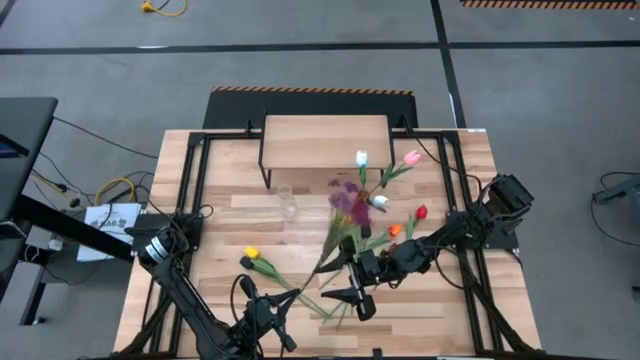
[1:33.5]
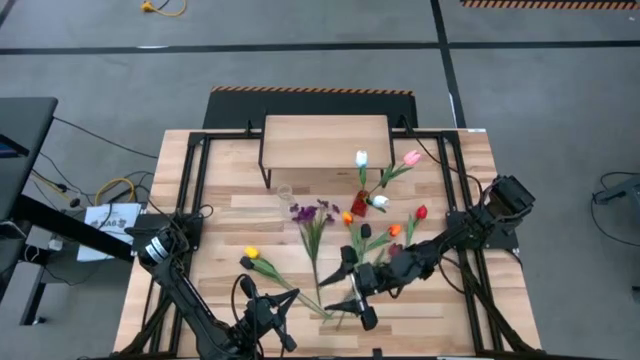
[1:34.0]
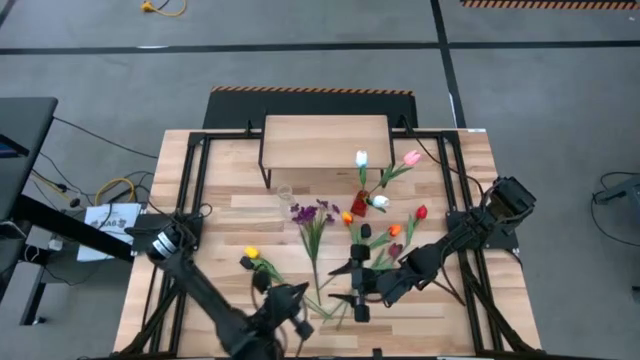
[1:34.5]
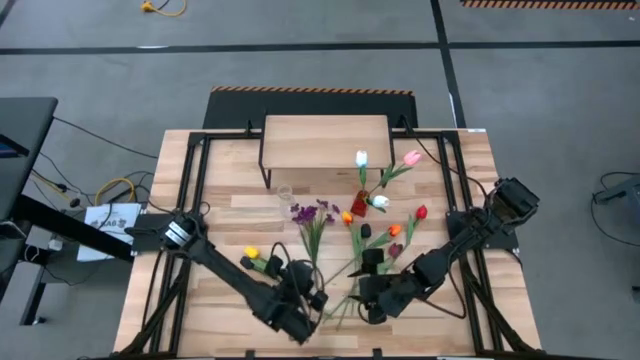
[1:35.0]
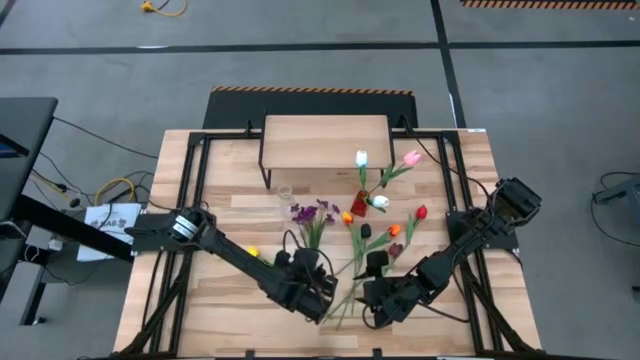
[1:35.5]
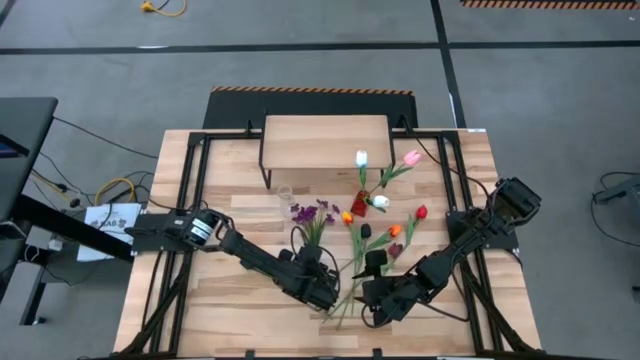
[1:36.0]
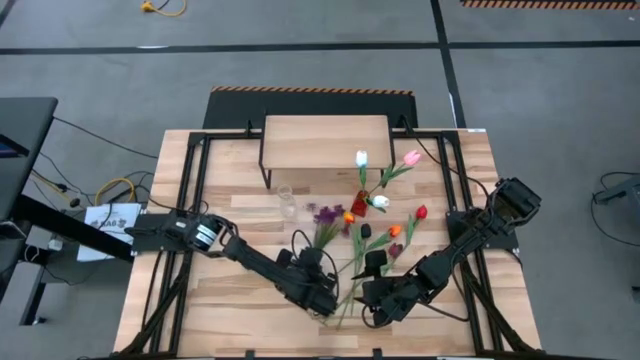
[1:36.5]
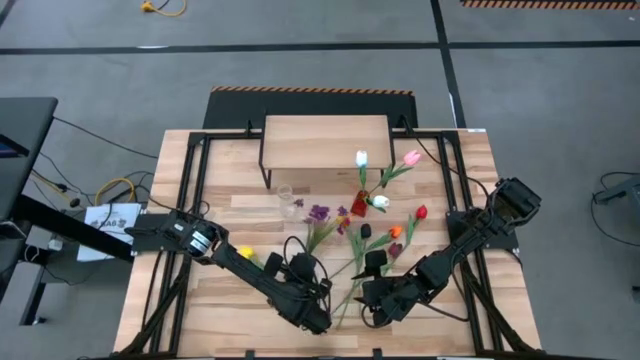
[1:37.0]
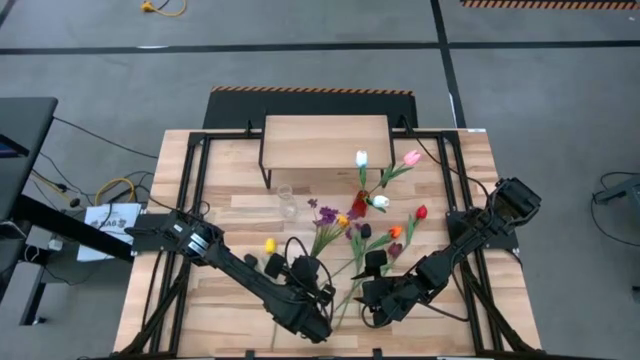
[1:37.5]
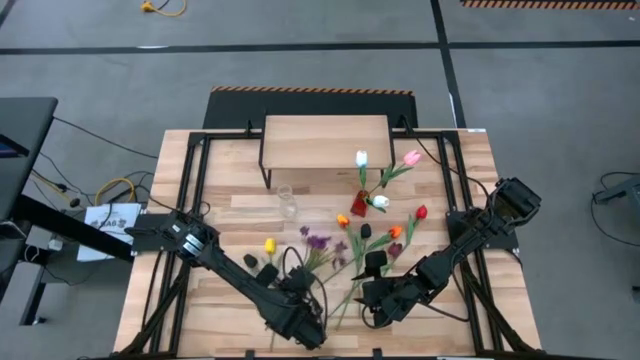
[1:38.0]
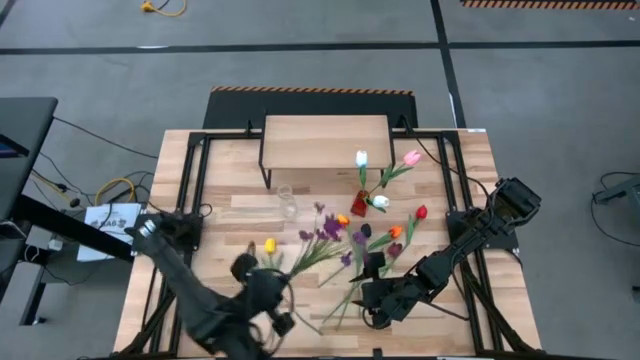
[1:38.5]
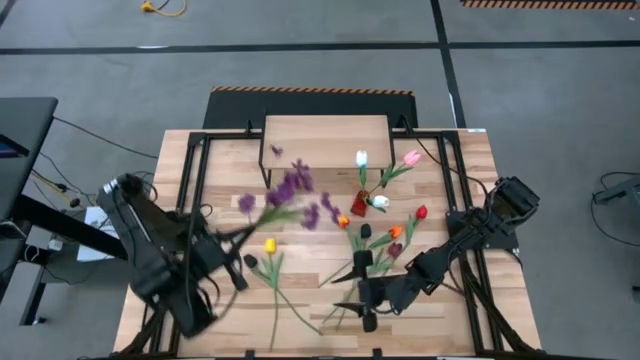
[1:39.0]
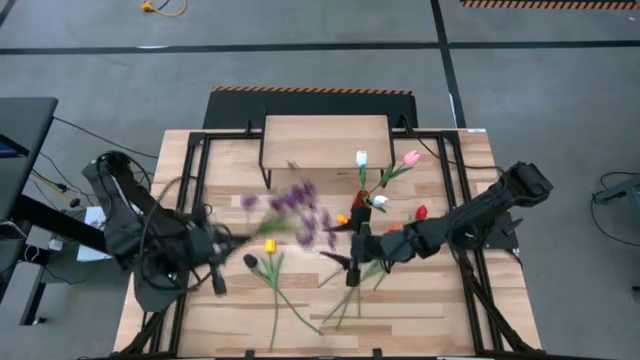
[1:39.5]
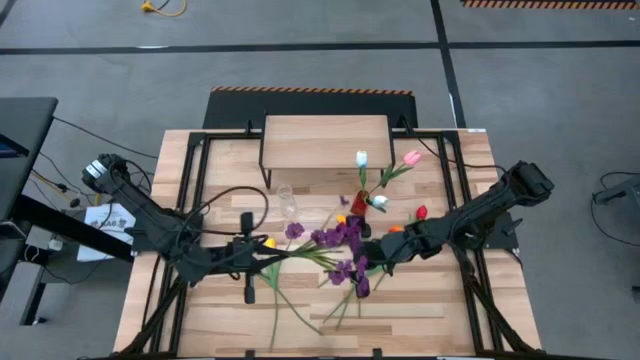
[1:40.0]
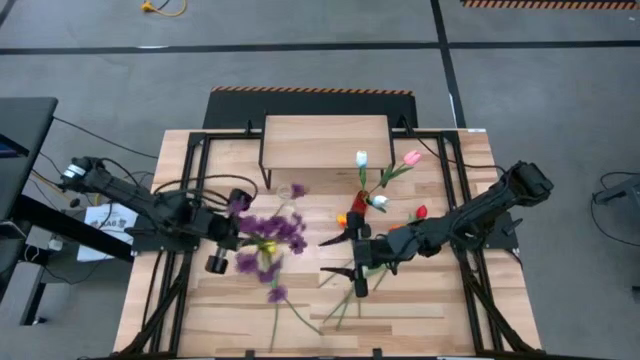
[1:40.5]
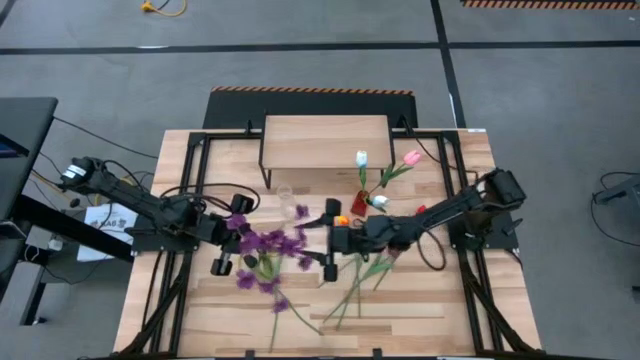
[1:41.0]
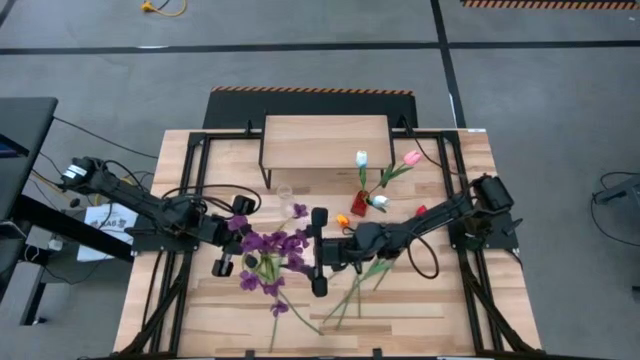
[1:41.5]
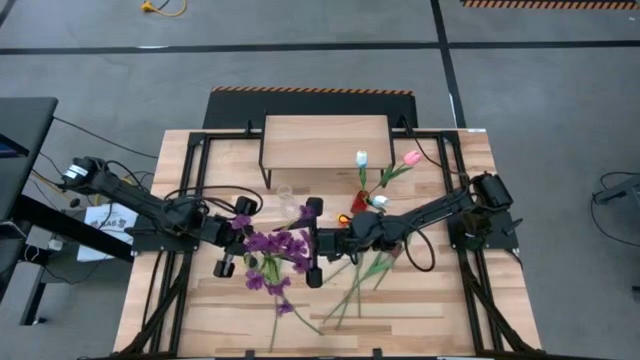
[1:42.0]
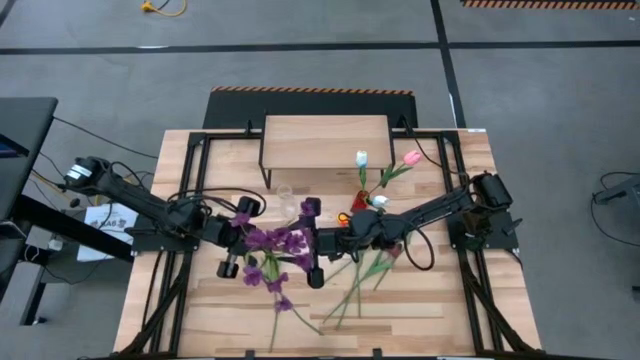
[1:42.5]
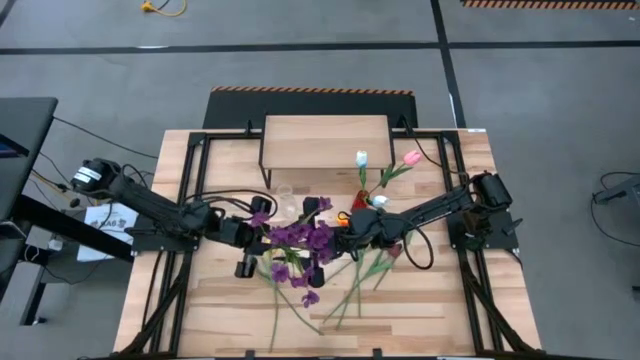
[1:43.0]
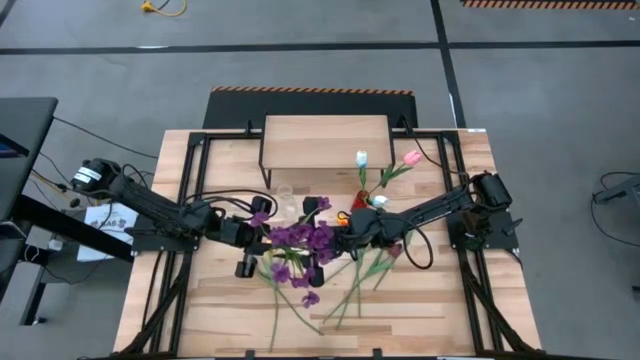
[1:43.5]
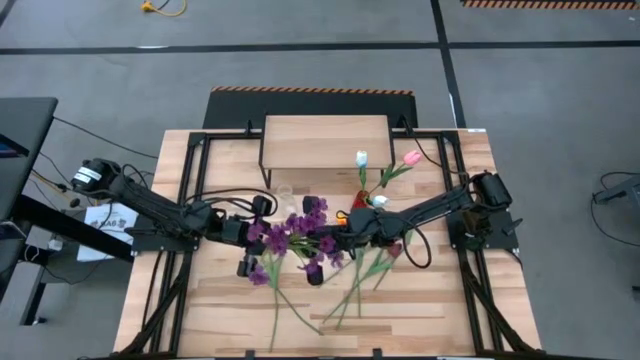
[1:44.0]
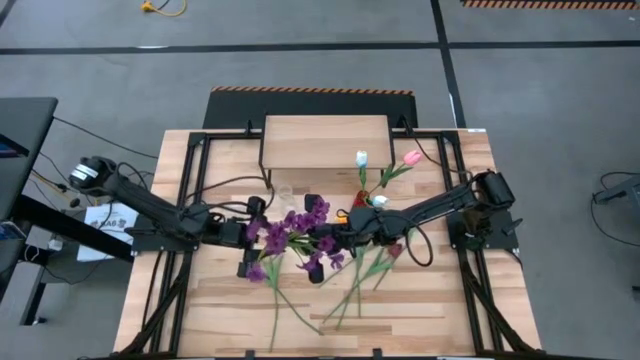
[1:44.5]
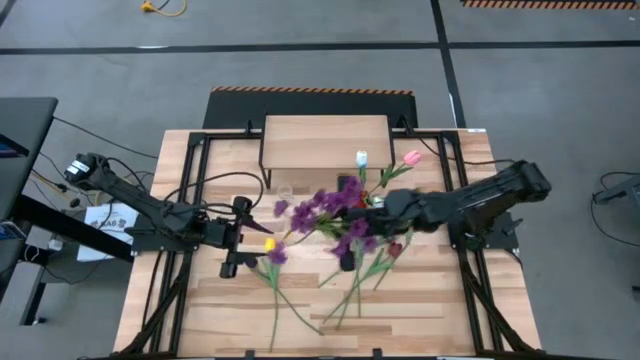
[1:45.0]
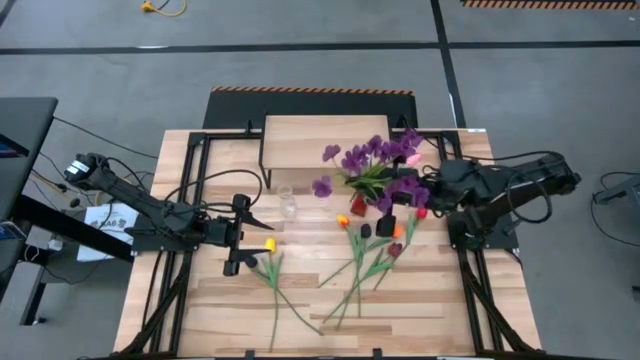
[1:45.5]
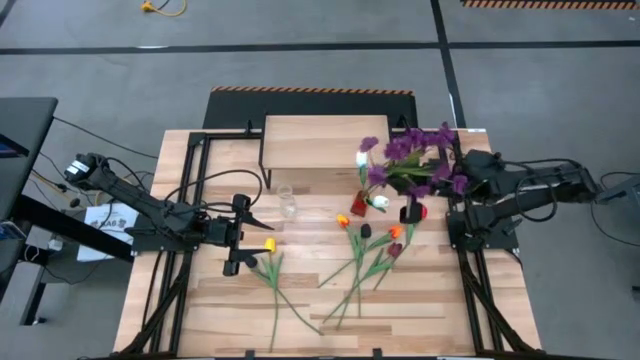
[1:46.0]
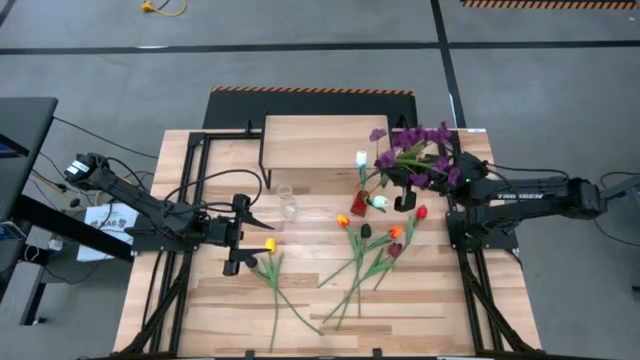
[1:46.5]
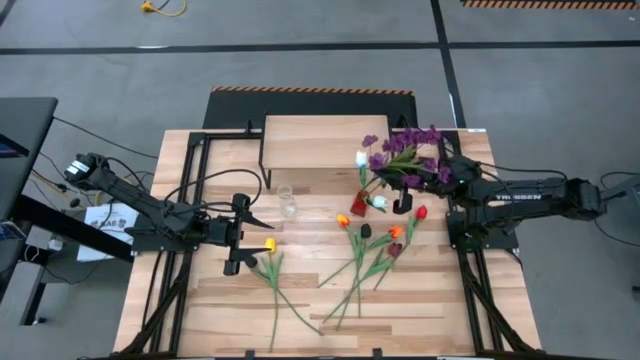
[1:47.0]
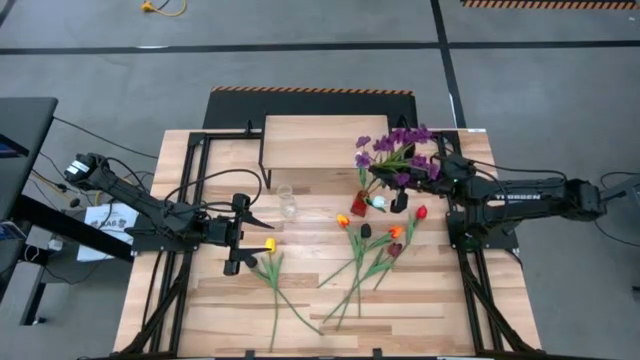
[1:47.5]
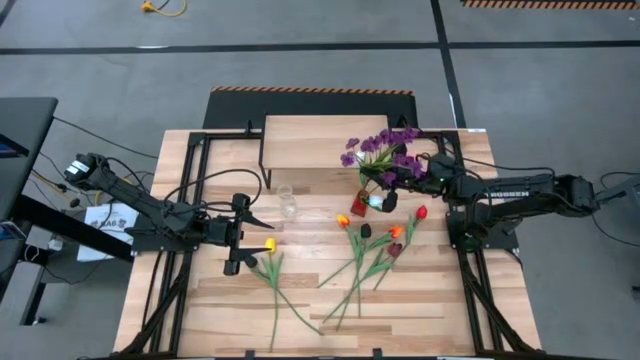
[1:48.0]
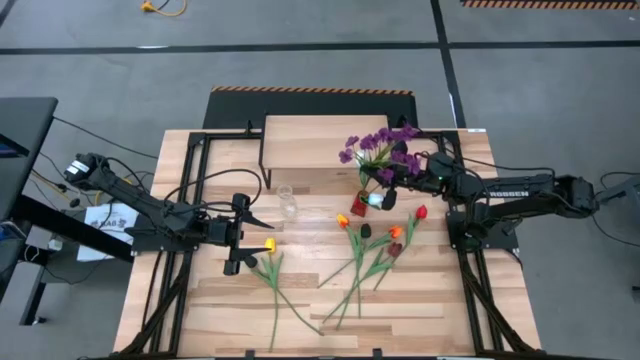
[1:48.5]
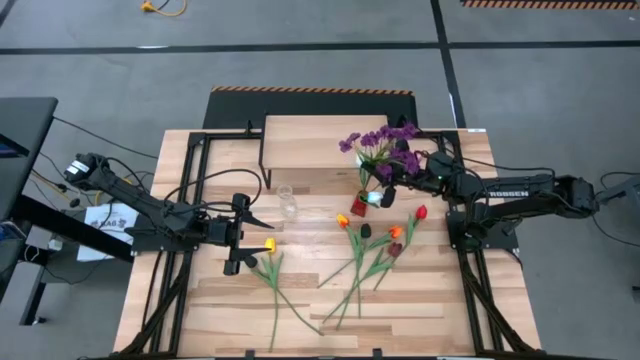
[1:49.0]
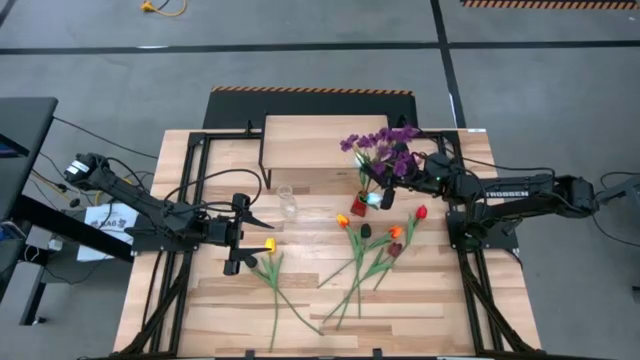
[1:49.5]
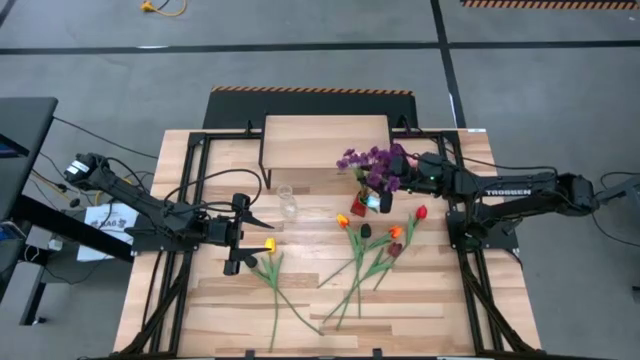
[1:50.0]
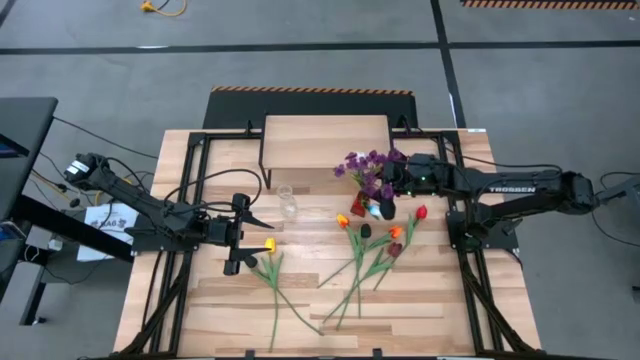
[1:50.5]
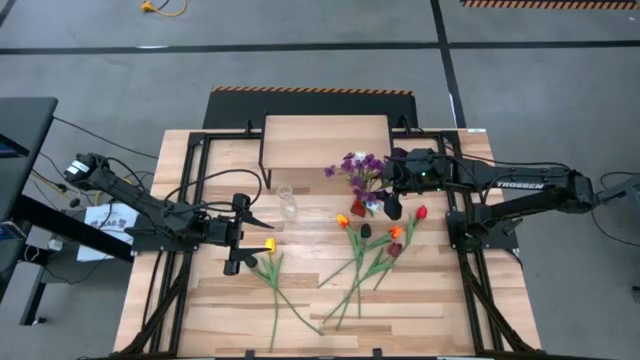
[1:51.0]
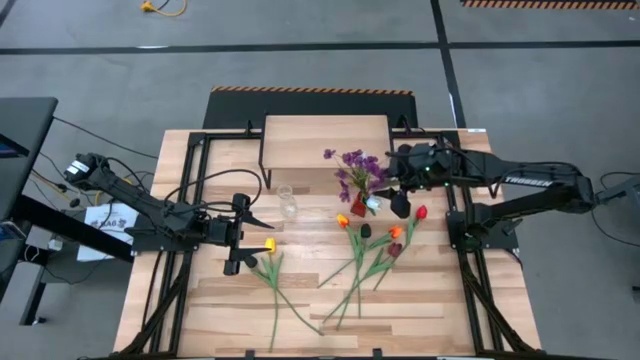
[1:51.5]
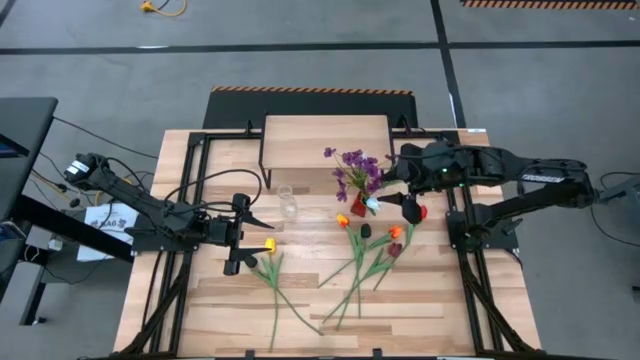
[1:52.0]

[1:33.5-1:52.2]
Task: Pick and place flowers into a vace then onto a shelf
Put the purple flowers into the red flower vase

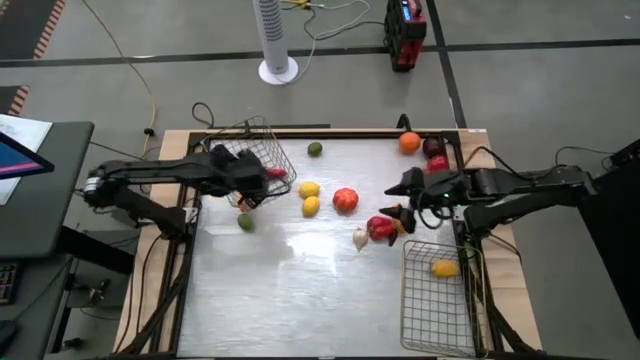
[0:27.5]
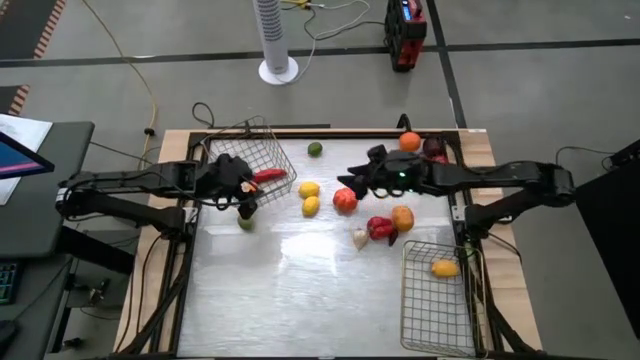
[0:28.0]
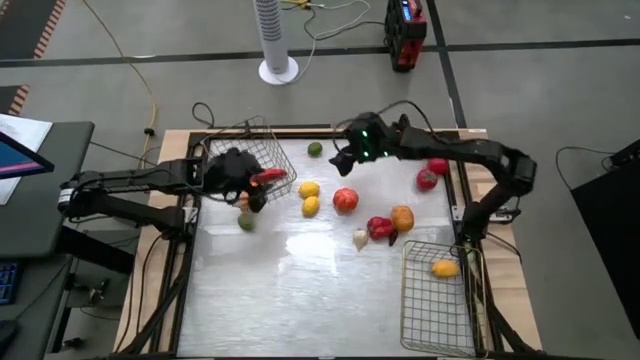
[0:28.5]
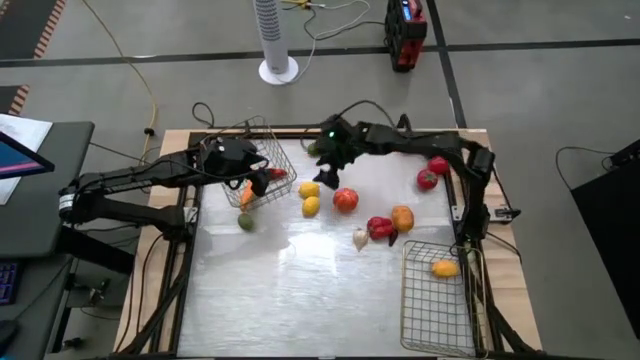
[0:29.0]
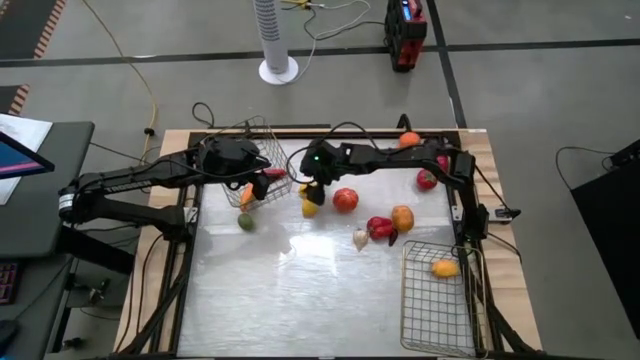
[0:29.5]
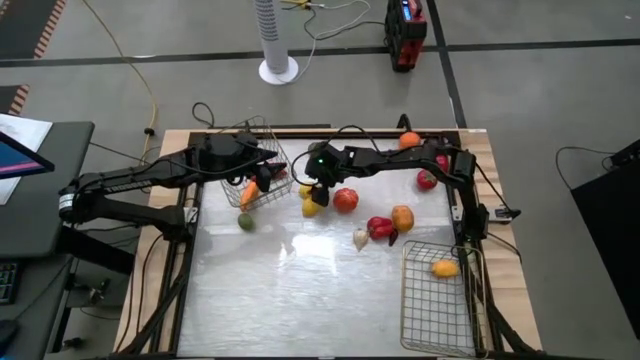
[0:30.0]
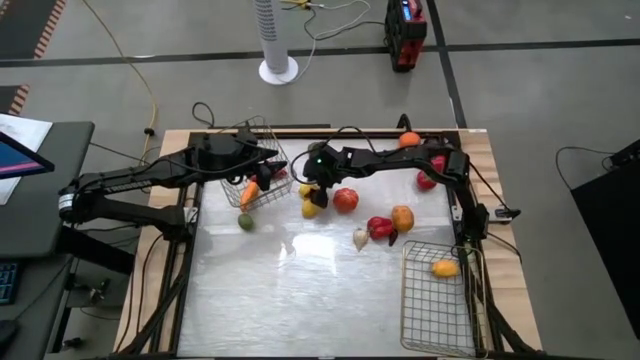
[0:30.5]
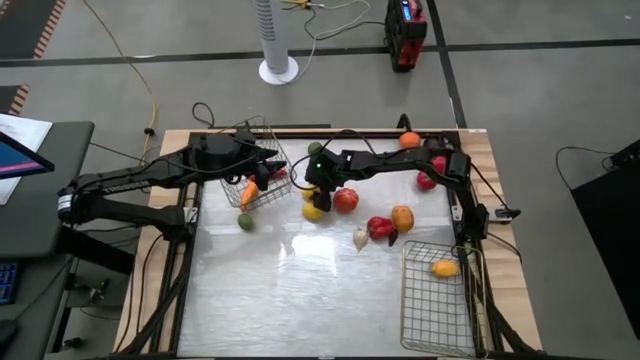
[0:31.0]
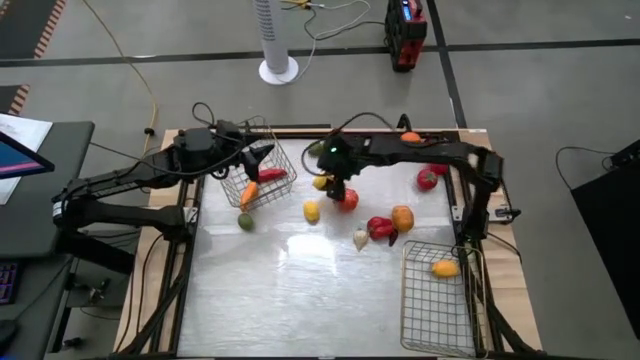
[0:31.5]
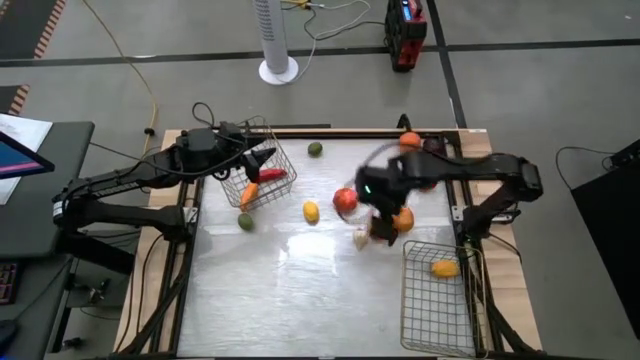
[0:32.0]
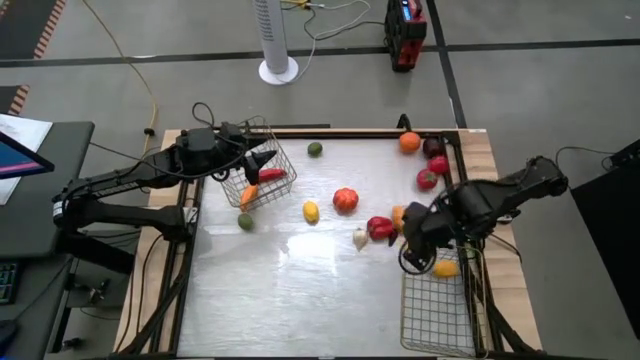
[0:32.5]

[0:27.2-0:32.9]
Task: Sort produce into baskets
Put the top lemon into the bottom wire basket
